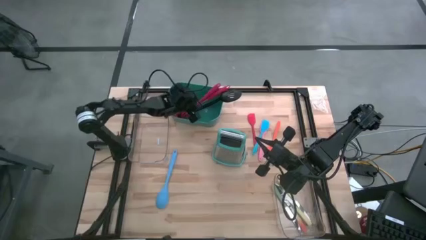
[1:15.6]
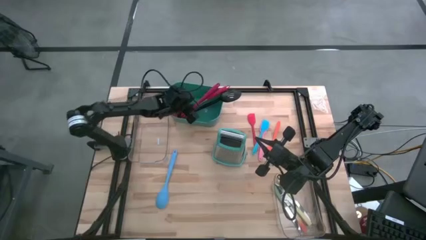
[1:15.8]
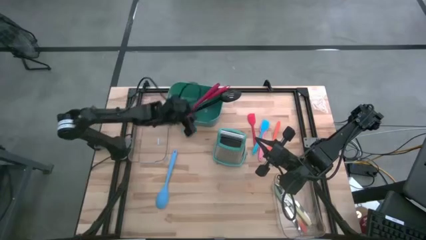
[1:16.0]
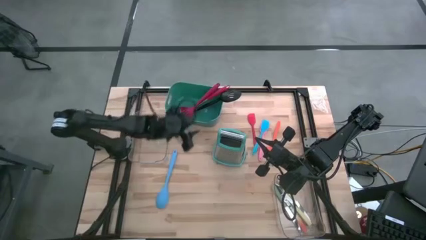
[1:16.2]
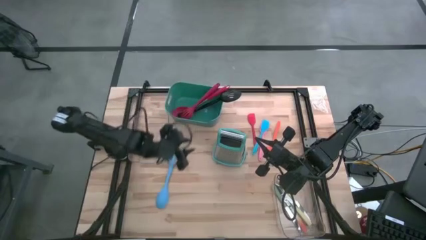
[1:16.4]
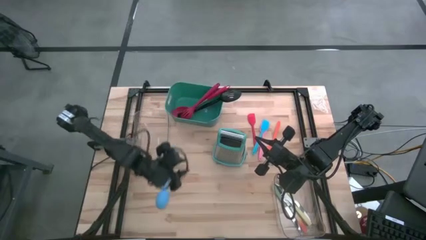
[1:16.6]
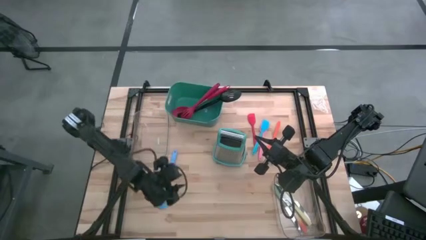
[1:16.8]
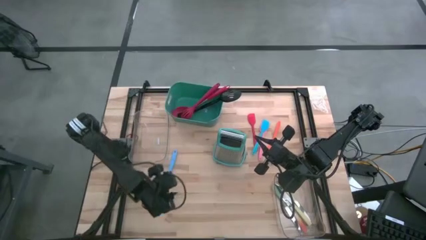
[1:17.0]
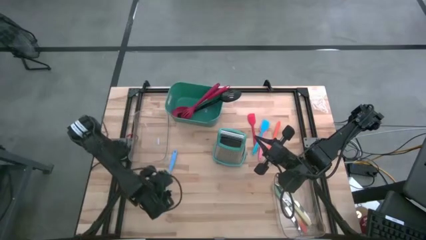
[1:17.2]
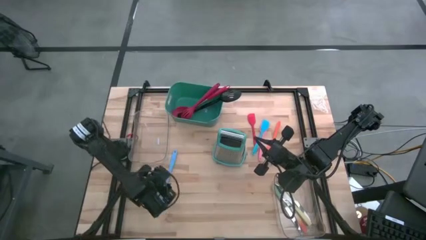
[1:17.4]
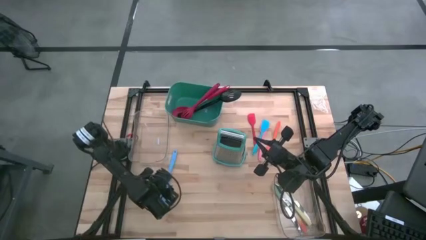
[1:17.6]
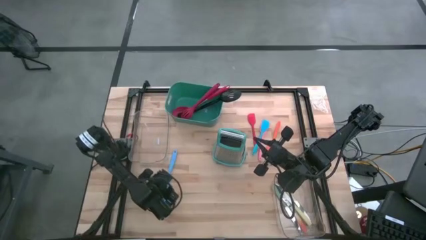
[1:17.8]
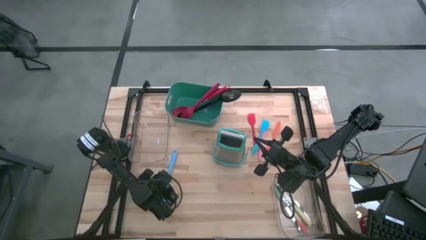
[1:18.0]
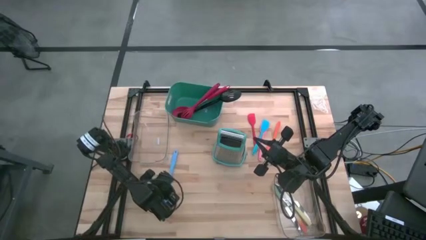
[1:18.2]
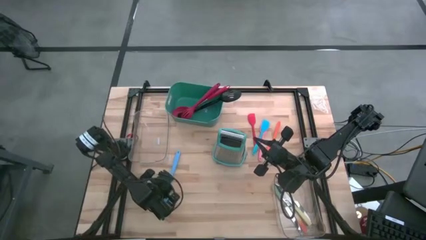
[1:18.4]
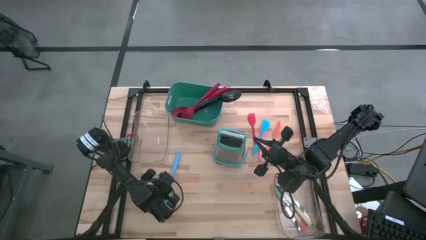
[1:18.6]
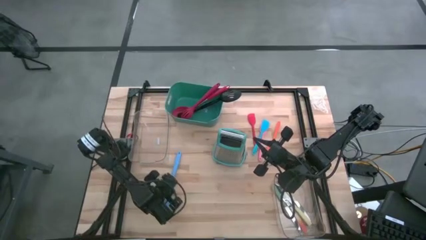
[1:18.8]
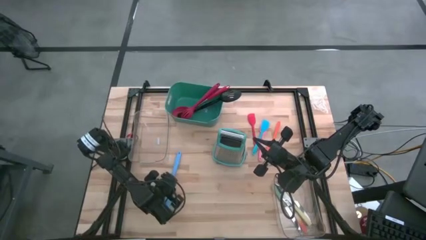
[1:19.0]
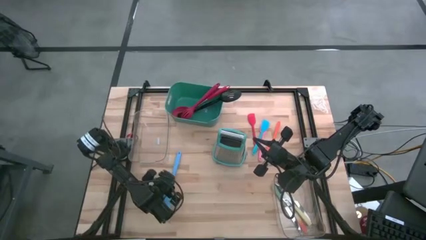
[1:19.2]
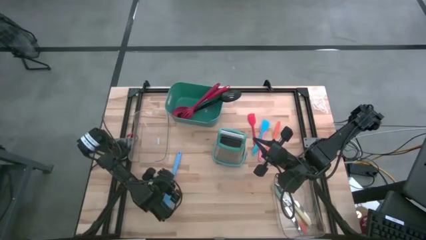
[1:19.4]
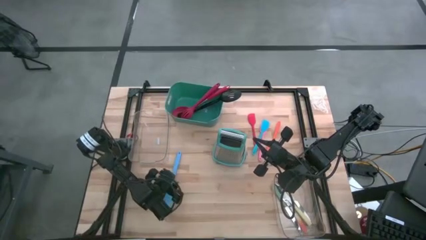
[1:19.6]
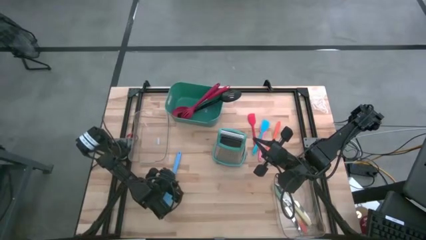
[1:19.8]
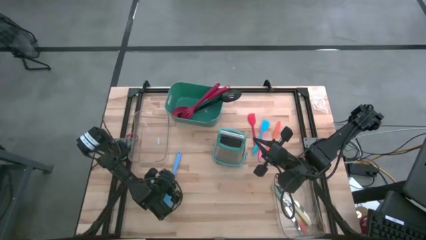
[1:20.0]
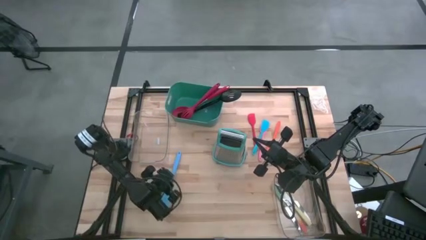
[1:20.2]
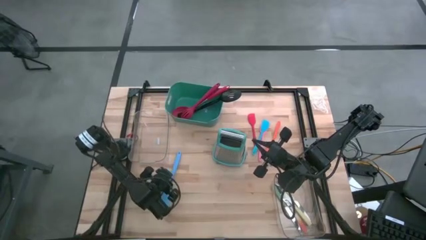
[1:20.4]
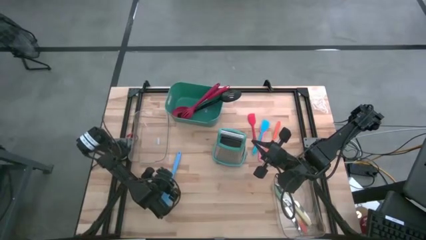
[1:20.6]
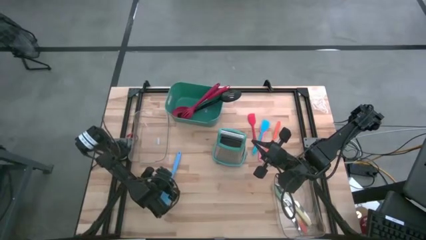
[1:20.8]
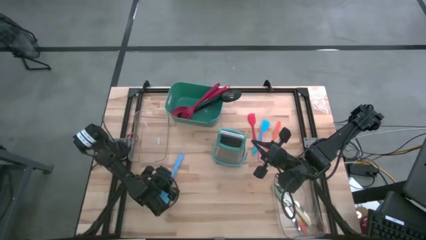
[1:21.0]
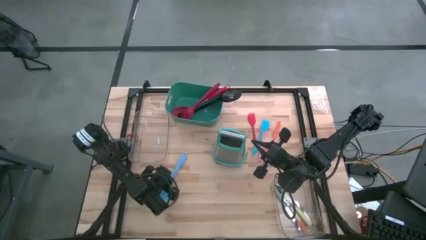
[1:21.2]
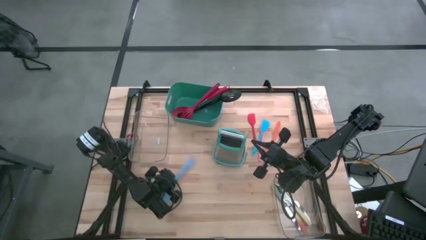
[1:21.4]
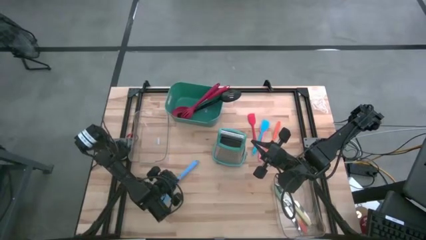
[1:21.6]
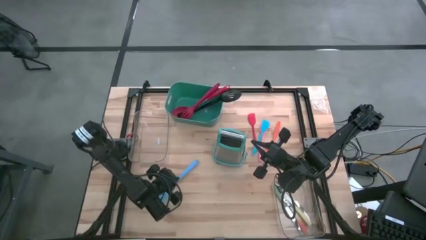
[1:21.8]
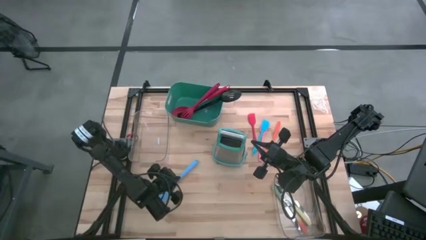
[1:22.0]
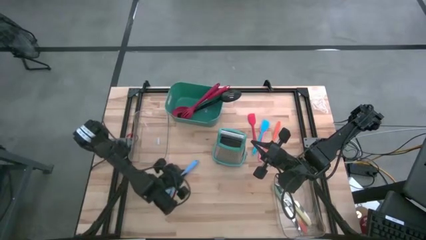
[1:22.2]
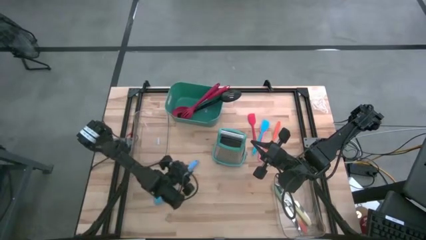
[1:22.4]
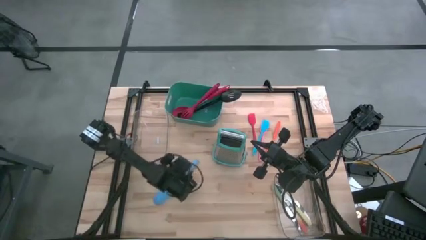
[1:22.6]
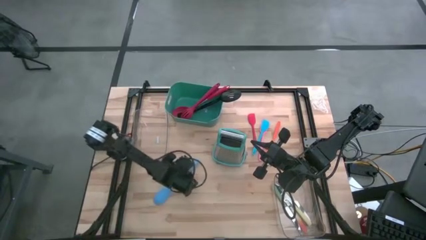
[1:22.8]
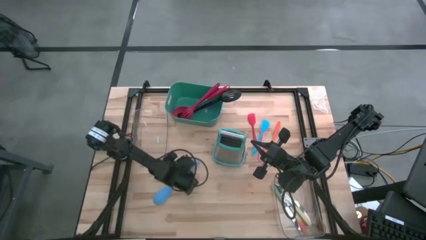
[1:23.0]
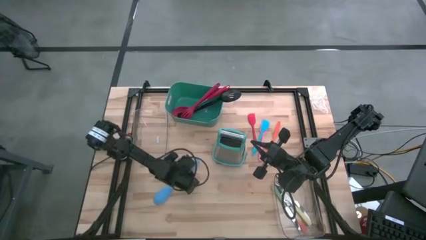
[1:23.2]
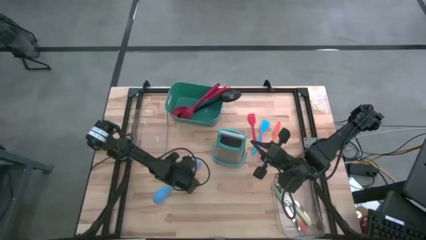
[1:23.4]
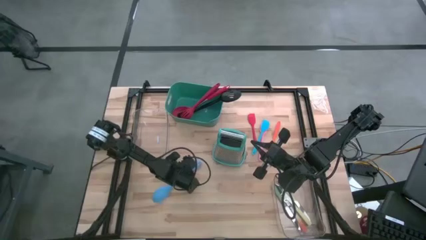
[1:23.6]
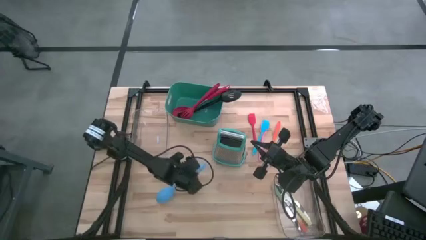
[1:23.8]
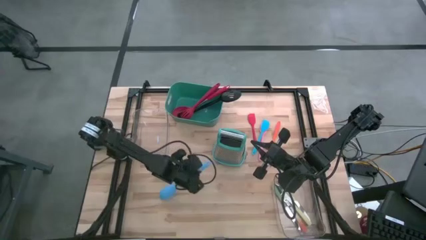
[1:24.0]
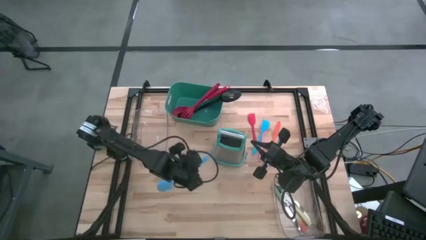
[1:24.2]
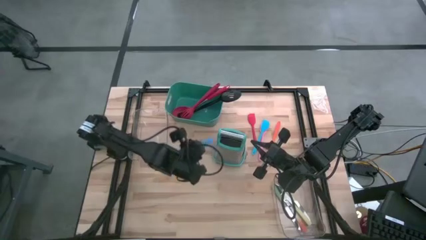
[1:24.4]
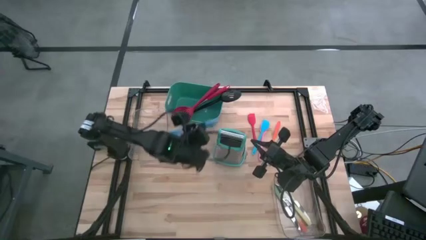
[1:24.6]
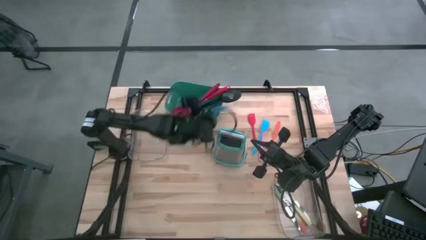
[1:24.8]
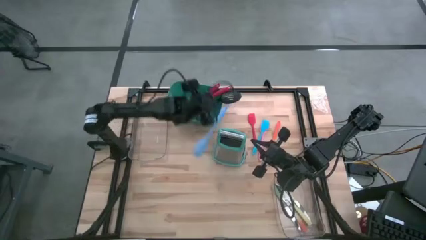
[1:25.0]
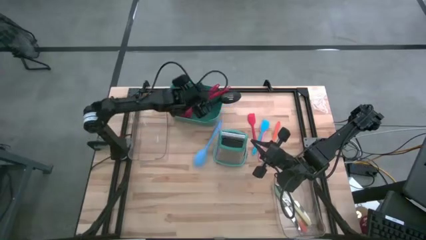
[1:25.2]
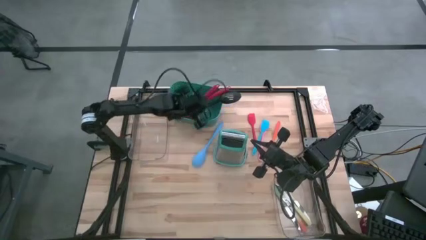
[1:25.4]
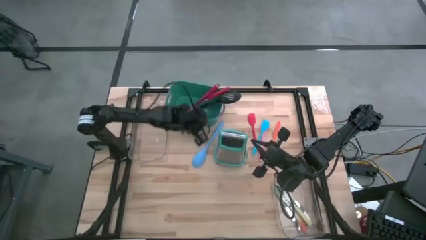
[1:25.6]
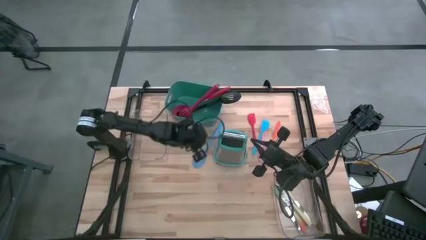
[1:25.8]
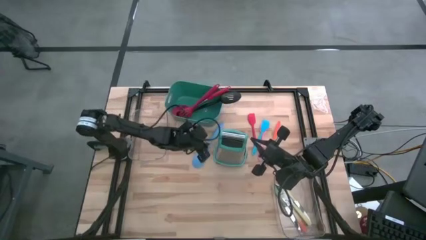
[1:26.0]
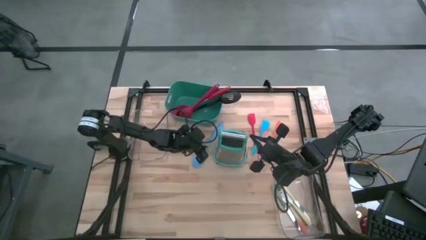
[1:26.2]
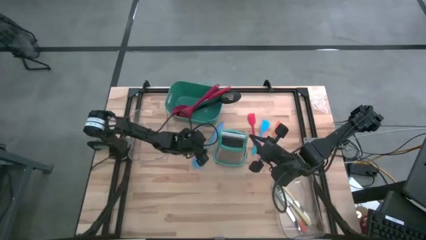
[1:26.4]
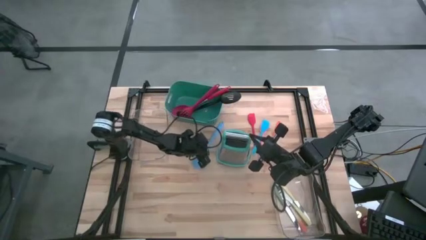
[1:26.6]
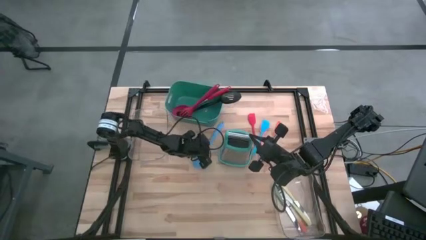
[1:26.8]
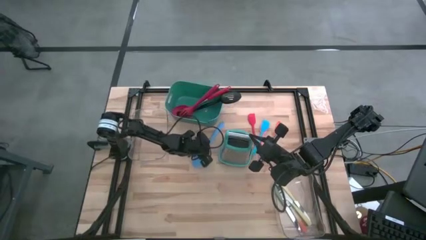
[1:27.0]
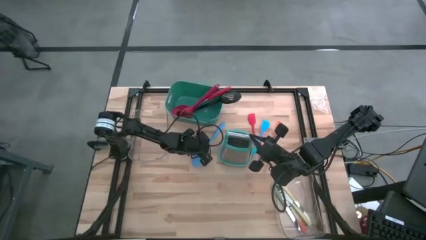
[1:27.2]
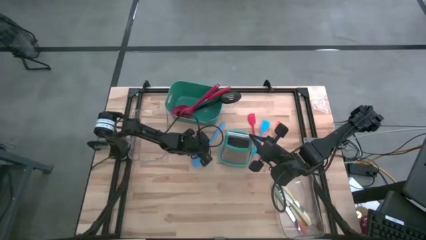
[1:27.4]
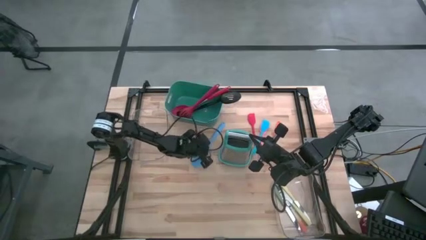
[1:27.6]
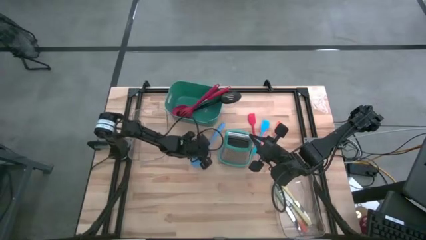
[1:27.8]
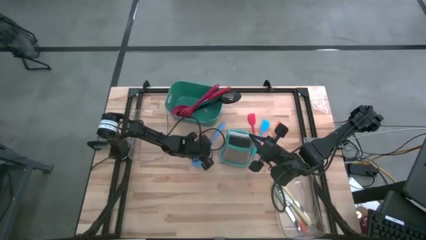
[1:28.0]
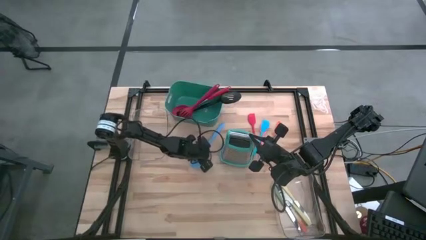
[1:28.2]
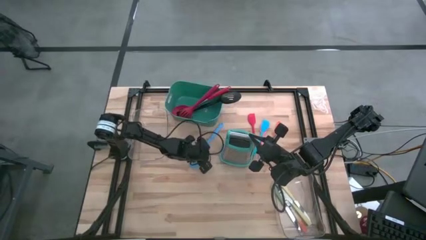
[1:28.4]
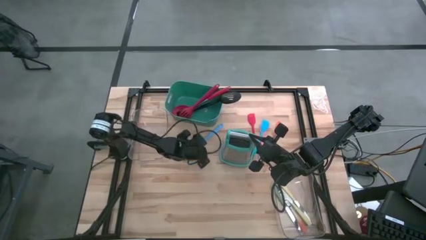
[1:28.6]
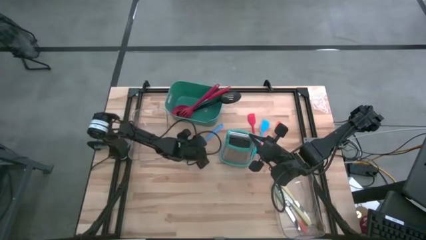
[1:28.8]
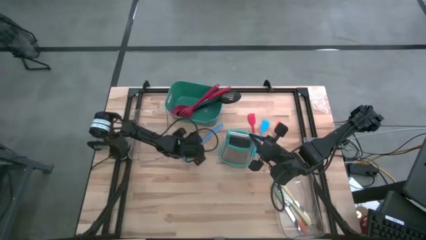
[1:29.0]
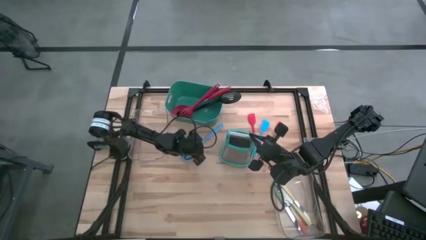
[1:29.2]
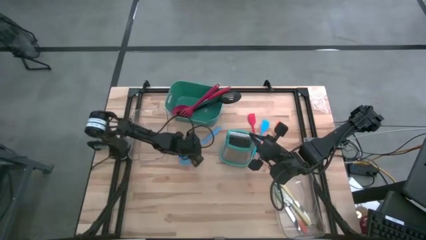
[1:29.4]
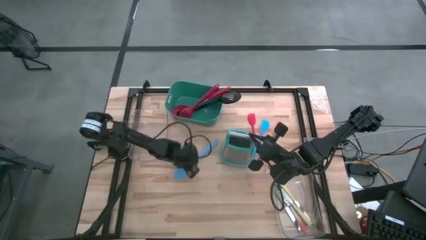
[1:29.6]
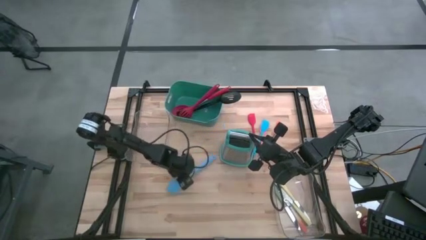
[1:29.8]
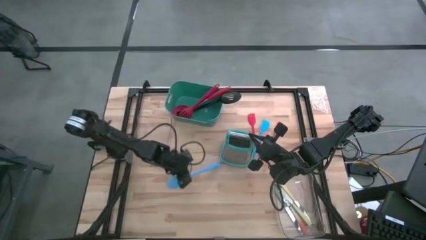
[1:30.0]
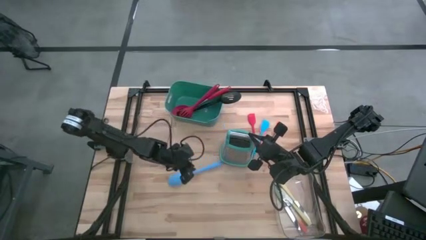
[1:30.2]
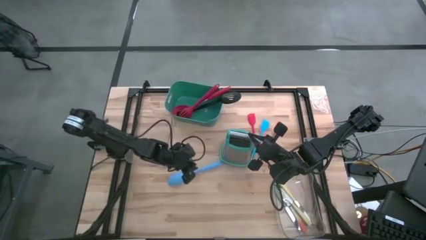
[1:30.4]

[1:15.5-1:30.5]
Task: Pick & Place Kitchen Items
Put the blue spoon into the green bin

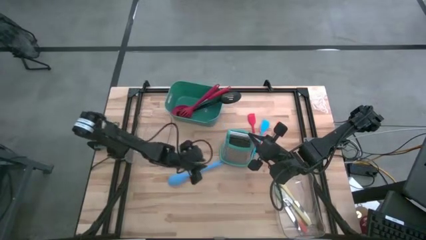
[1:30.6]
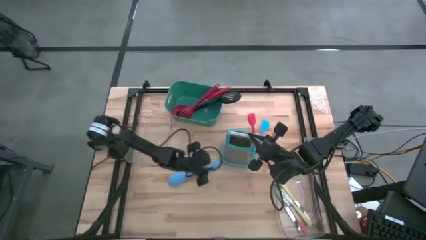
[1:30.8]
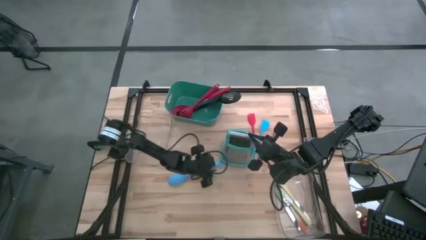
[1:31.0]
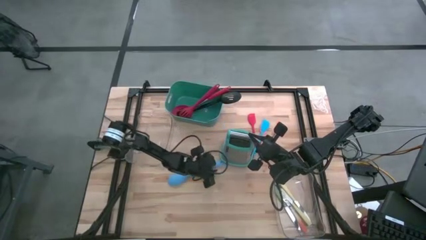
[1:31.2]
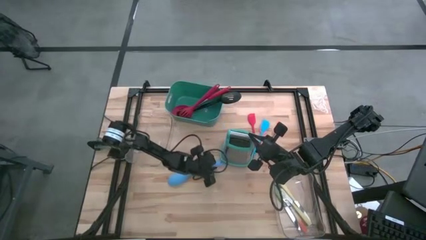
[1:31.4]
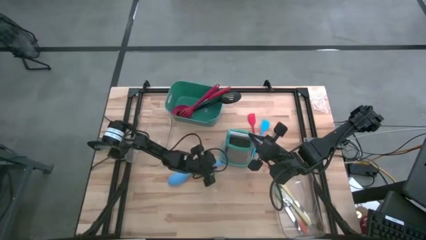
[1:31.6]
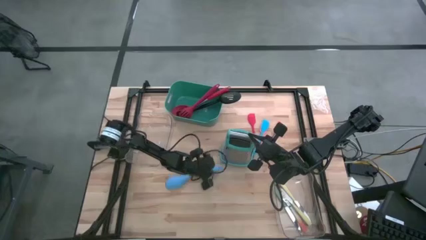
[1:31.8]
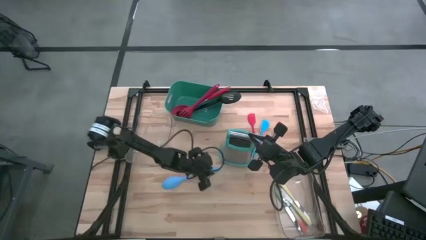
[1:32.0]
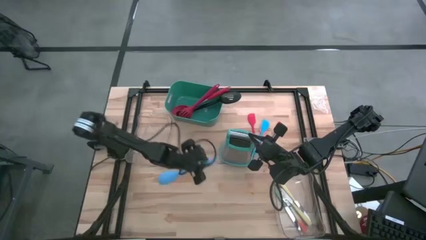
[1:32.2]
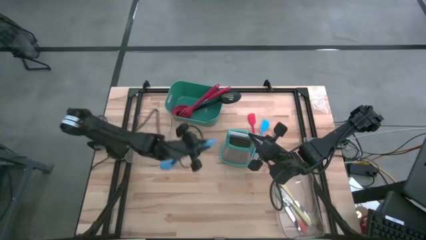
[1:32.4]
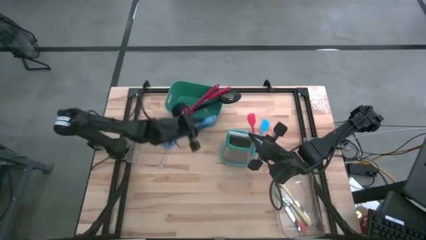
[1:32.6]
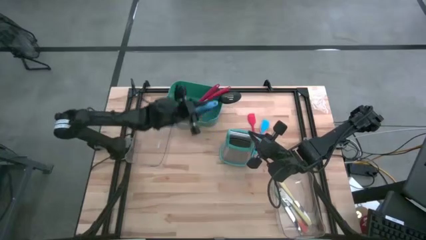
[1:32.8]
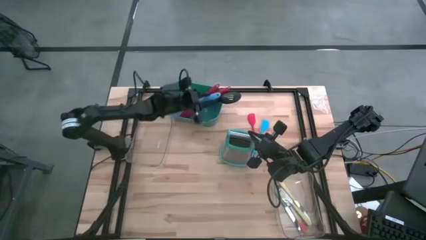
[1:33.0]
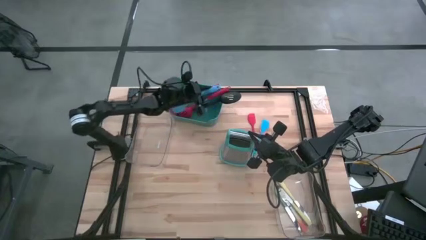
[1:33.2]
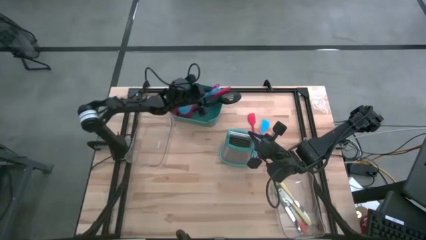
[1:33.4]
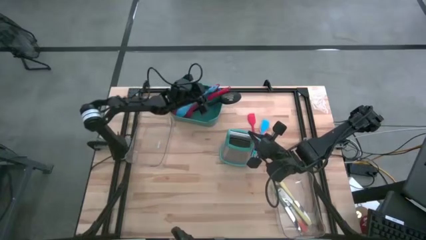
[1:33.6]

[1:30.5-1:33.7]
Put the blue spoon into the green bin
